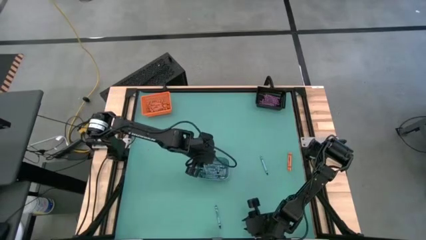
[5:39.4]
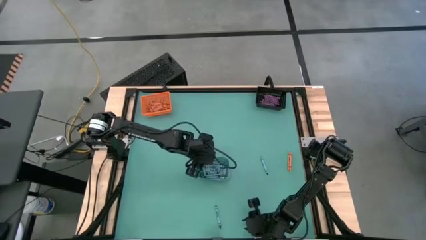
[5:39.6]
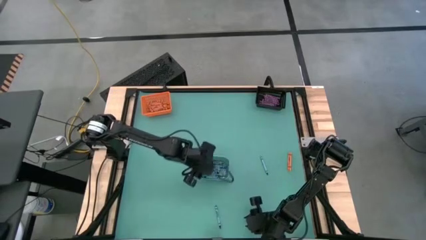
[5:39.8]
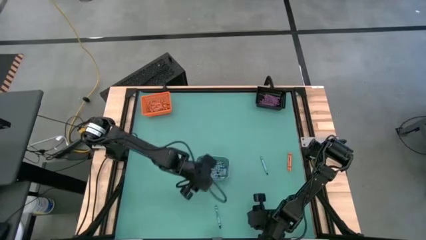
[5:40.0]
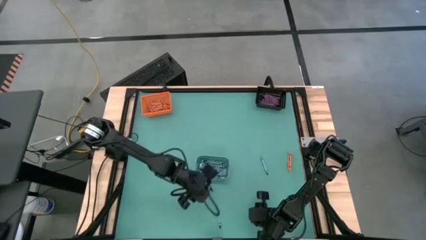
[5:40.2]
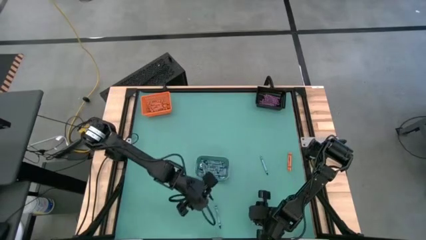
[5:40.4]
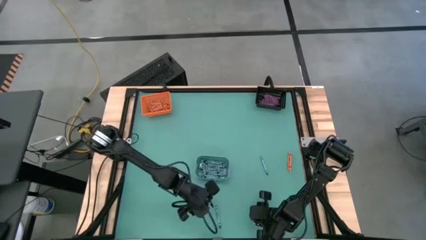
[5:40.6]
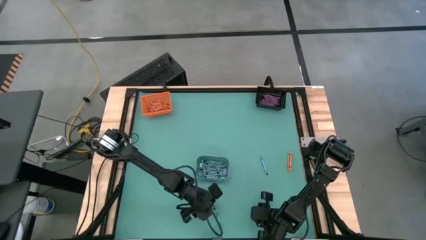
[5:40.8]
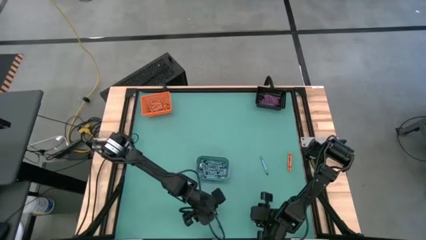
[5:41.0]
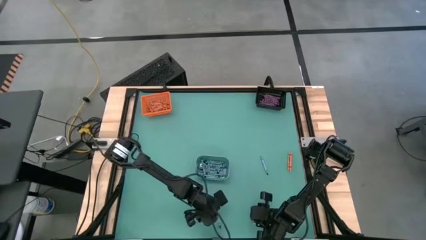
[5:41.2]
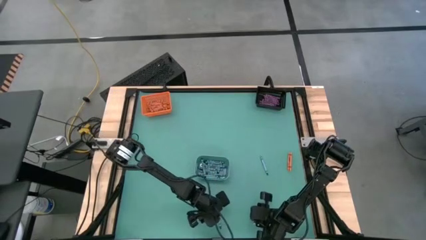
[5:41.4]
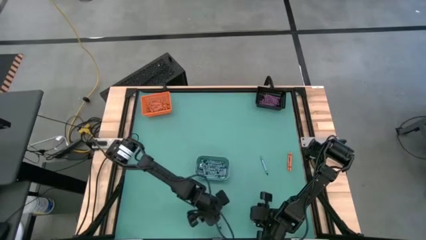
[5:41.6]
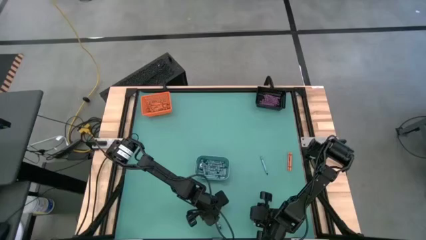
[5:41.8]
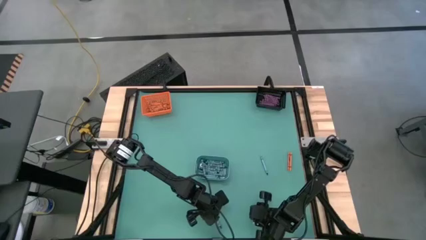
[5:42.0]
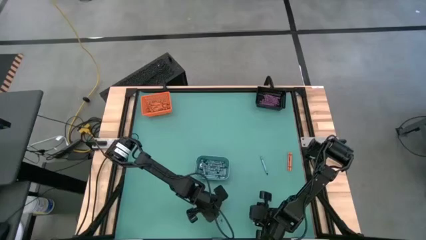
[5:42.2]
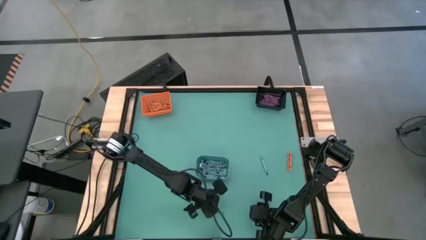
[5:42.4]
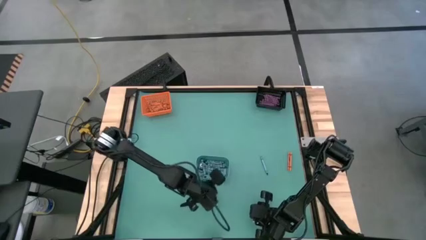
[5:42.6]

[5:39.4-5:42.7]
Task: Sort crayons
Put the blue crayon into the blue bin

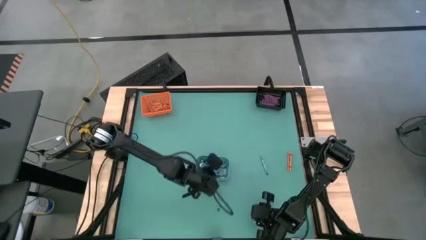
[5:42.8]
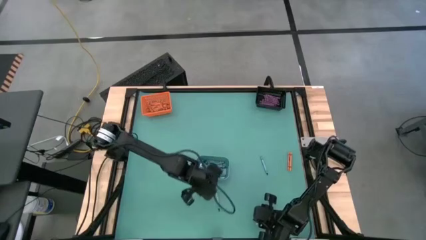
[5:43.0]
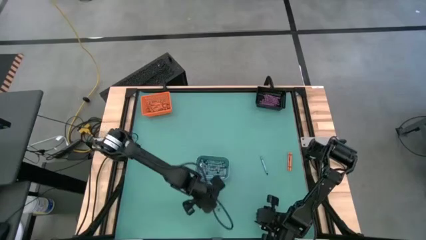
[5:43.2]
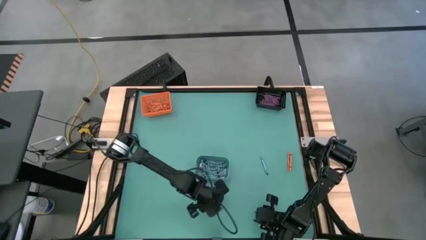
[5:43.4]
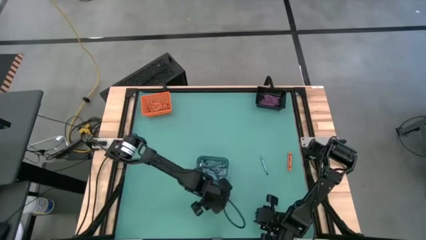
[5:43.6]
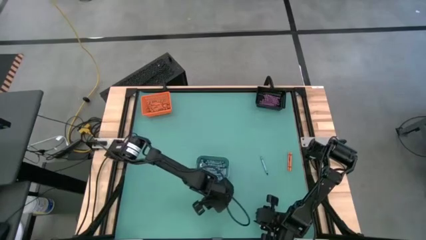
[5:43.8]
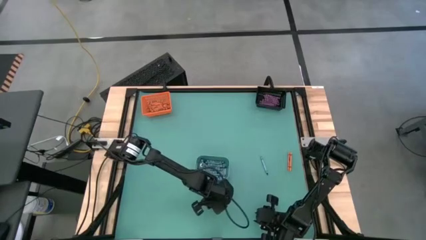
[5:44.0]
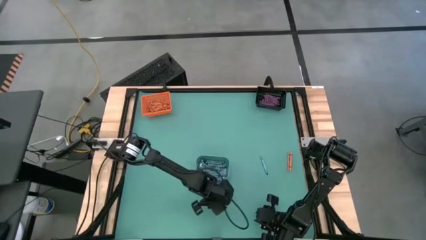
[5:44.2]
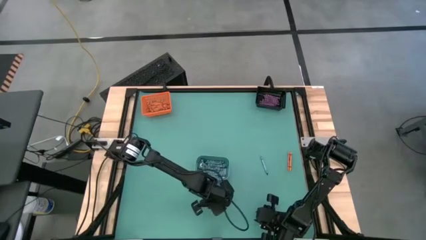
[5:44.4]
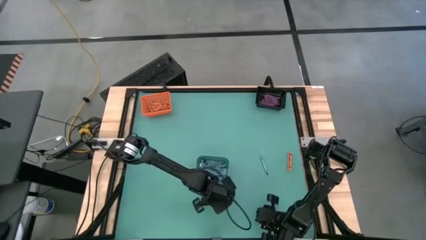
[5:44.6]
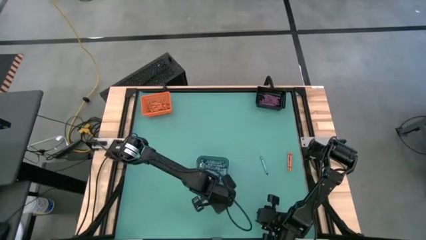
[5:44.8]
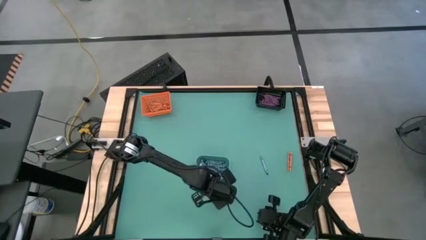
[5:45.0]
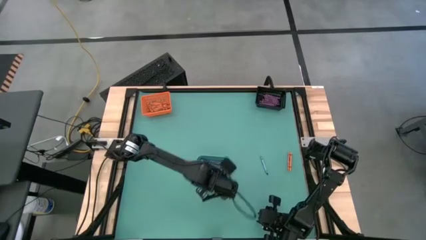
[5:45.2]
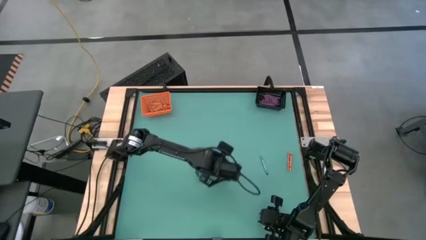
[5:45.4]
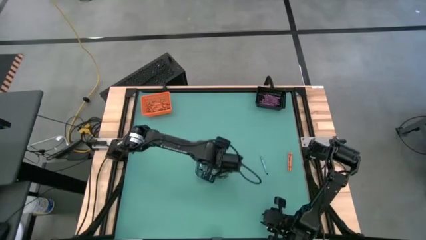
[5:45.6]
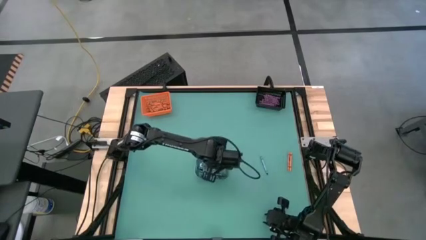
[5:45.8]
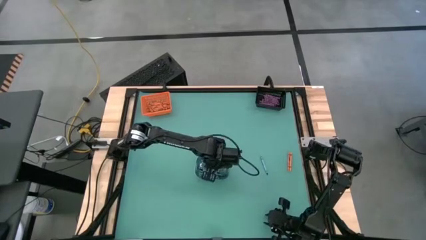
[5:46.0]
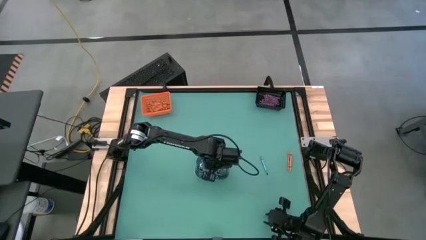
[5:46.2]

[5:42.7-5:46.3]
Put the blue crayon into the blue bin

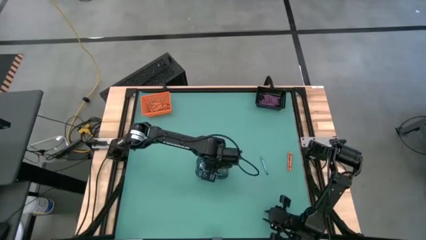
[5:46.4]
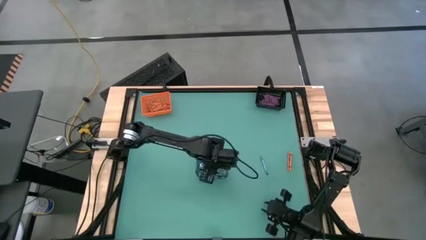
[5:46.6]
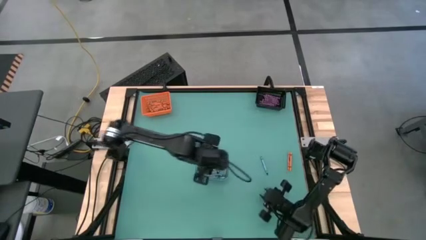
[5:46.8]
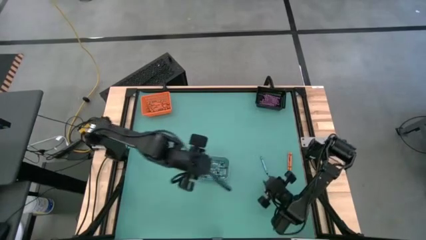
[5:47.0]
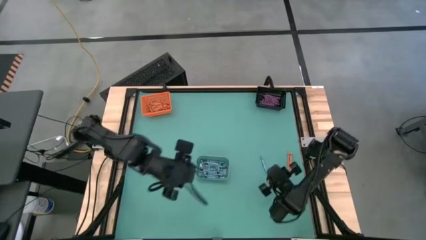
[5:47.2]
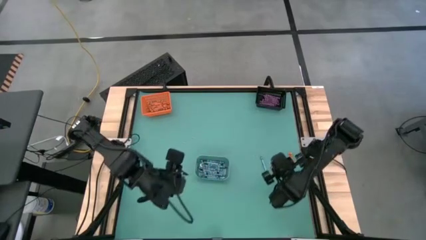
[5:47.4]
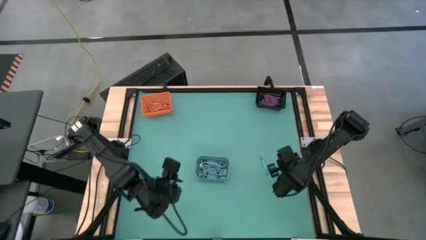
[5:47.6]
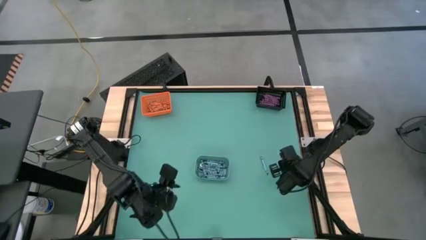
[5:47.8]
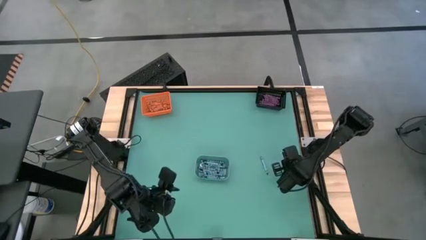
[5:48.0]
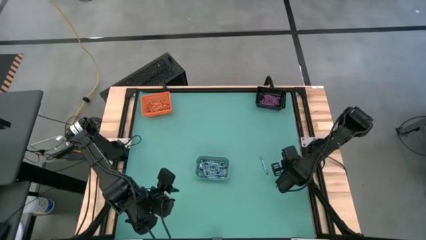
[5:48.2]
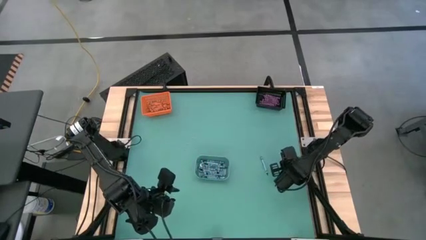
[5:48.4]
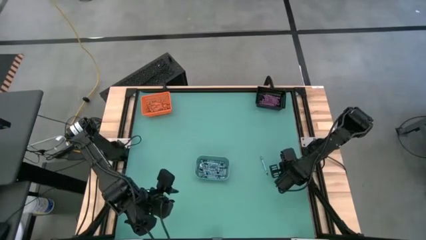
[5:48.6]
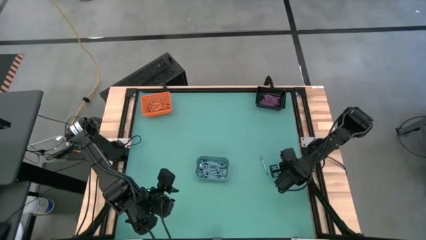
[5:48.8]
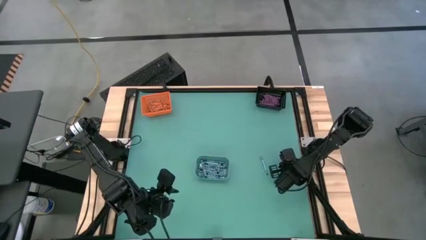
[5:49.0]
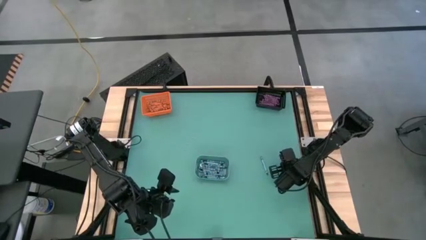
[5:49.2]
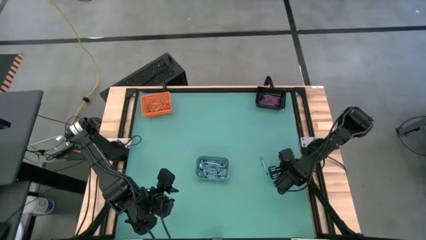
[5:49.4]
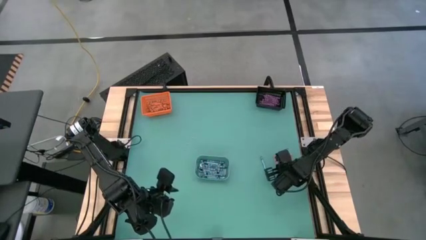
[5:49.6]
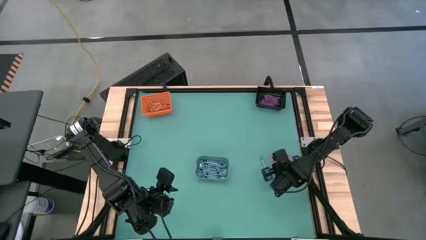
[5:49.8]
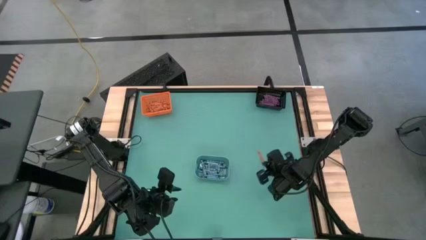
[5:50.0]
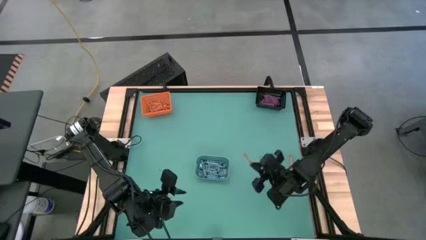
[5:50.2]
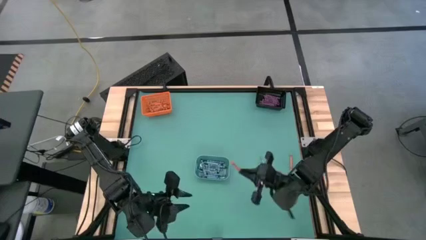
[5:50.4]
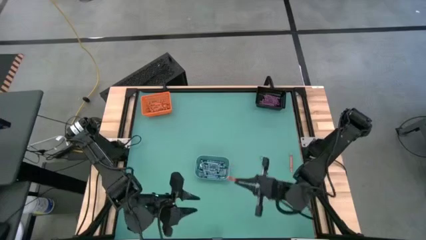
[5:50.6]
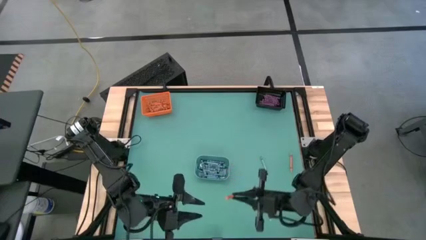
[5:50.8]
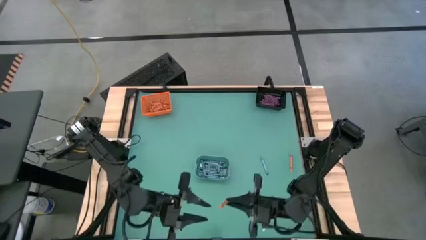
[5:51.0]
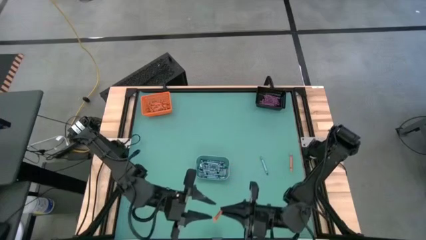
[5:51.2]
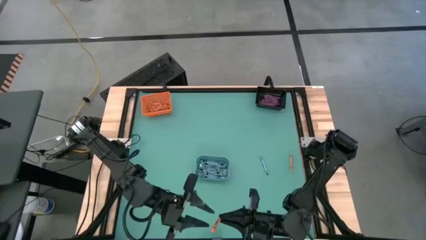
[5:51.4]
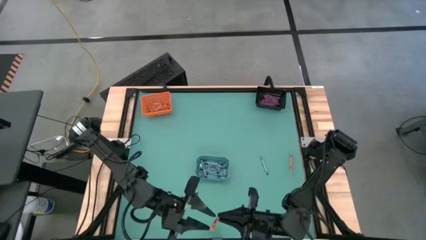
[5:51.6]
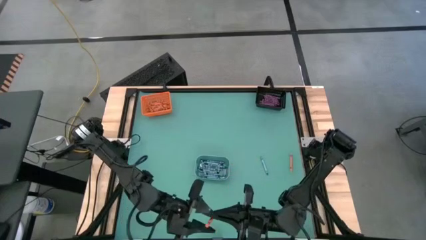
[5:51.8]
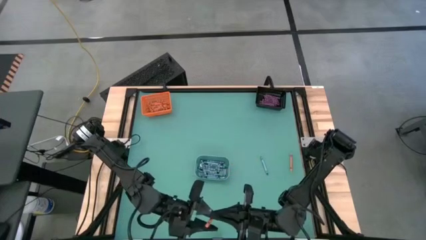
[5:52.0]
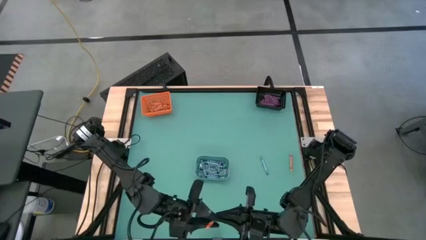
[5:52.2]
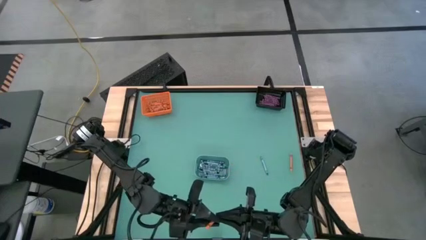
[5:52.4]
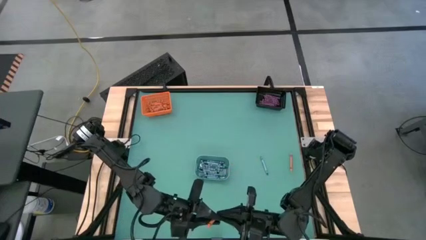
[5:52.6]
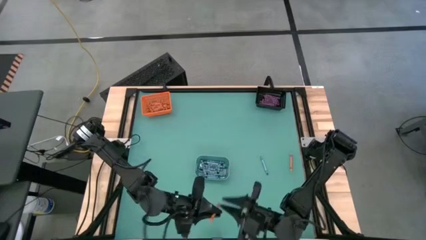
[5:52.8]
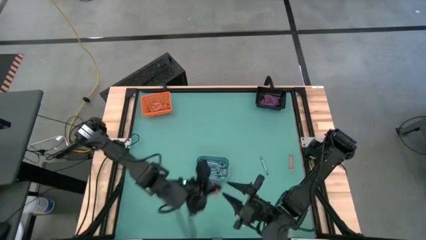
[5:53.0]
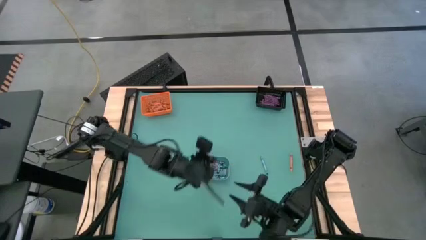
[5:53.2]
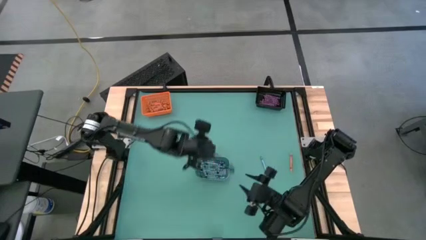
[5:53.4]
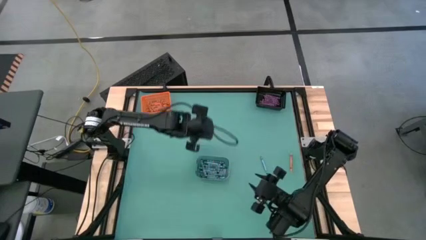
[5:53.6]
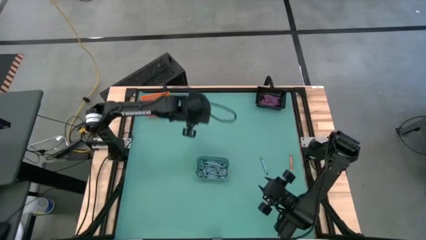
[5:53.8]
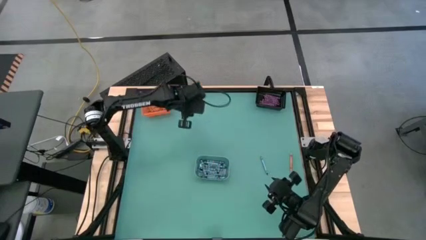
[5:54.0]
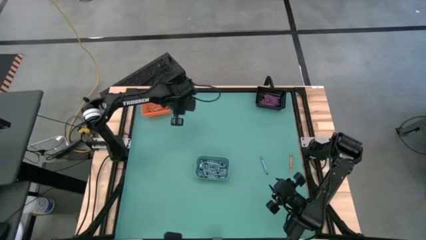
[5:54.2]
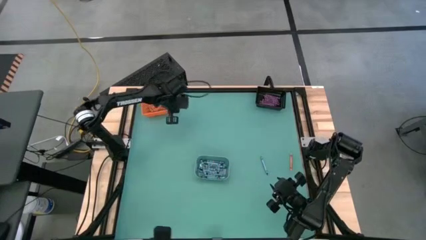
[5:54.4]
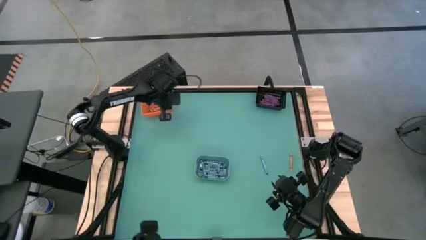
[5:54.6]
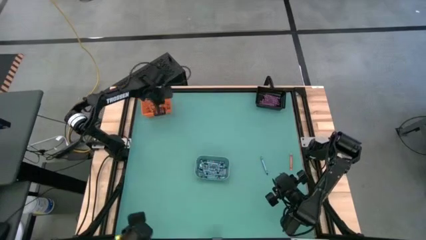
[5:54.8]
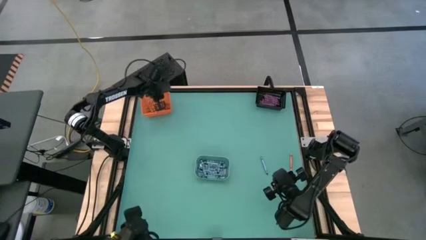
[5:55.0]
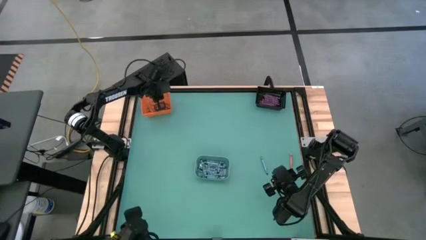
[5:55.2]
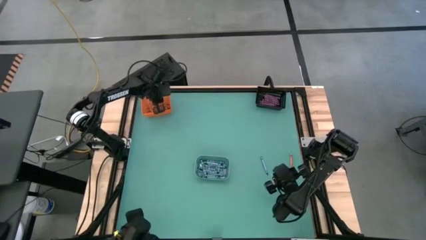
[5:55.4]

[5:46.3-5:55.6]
Put the orange crayon into the orange bin
